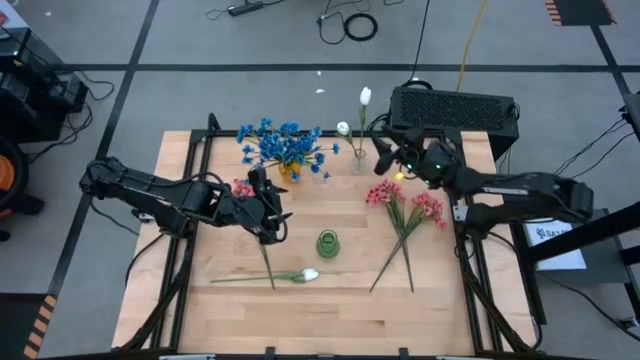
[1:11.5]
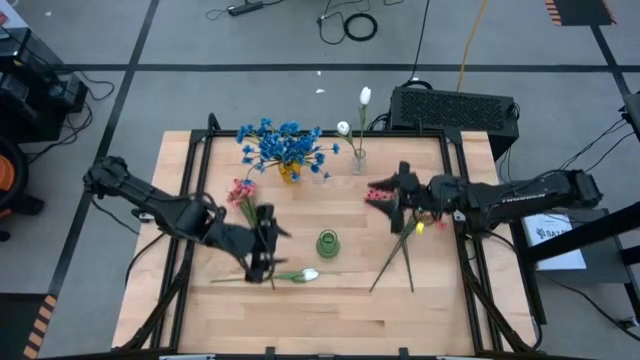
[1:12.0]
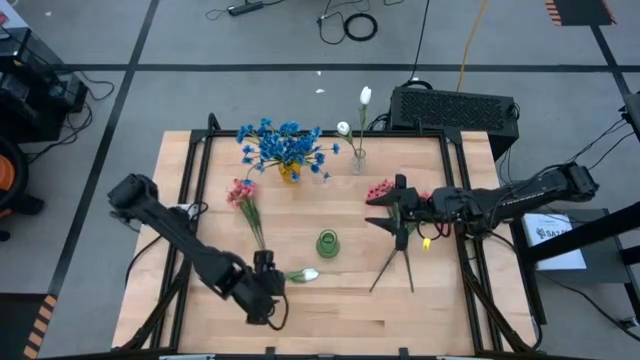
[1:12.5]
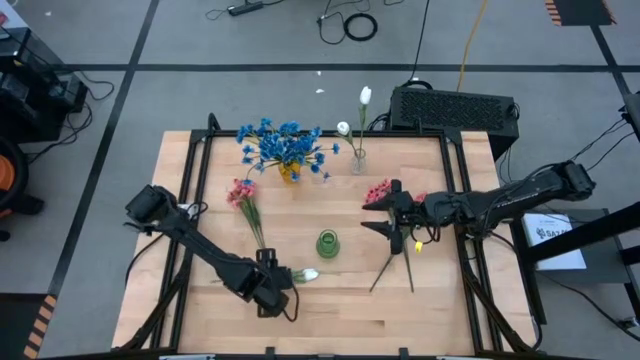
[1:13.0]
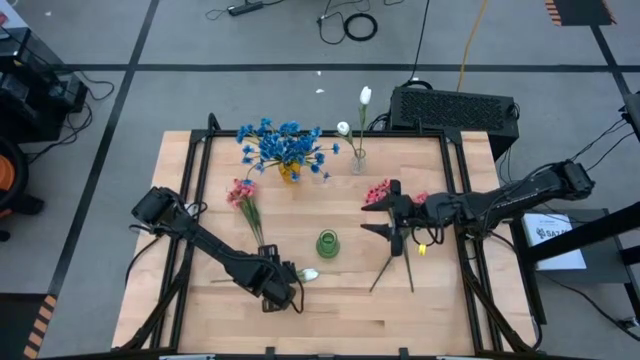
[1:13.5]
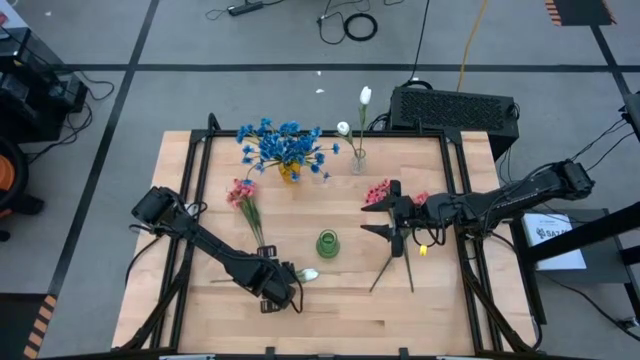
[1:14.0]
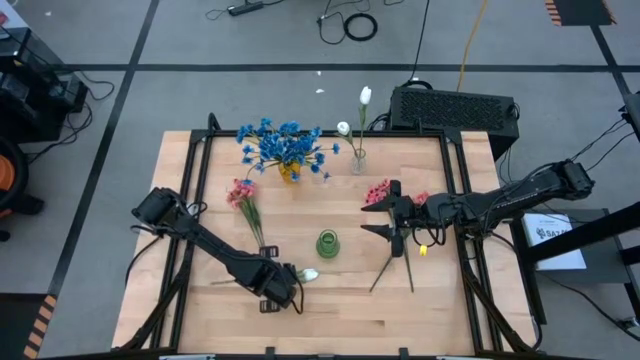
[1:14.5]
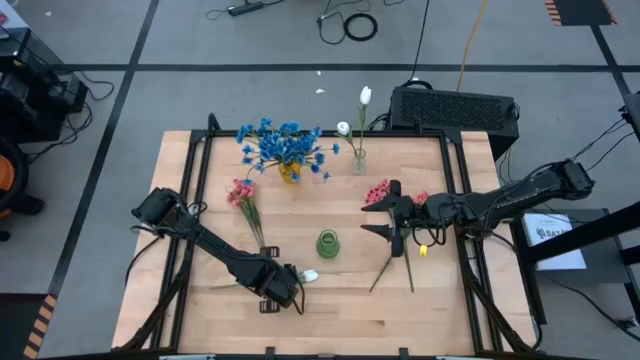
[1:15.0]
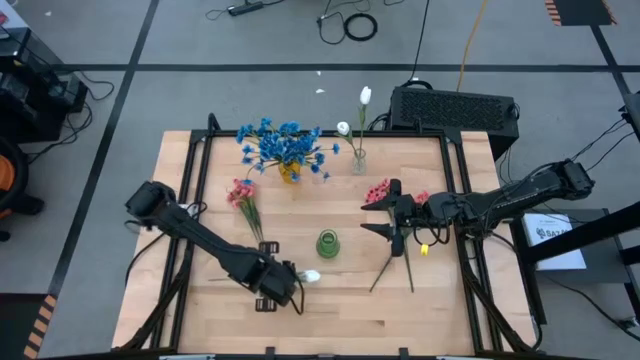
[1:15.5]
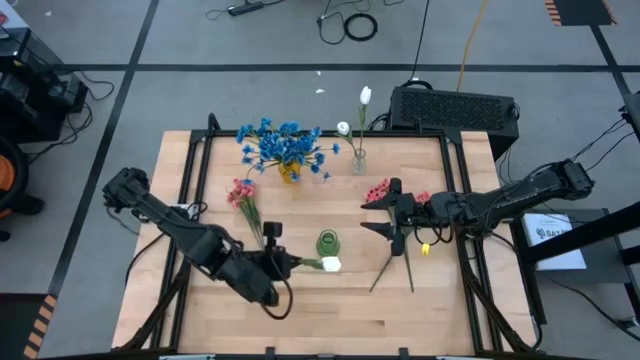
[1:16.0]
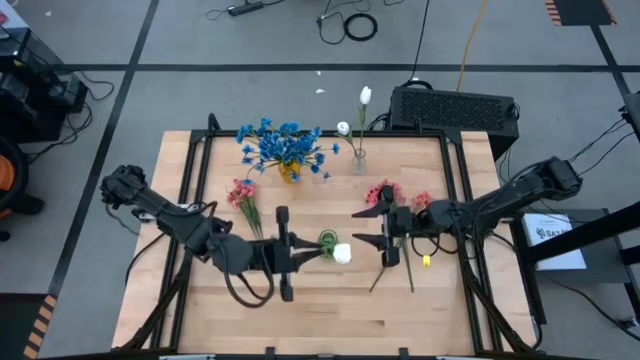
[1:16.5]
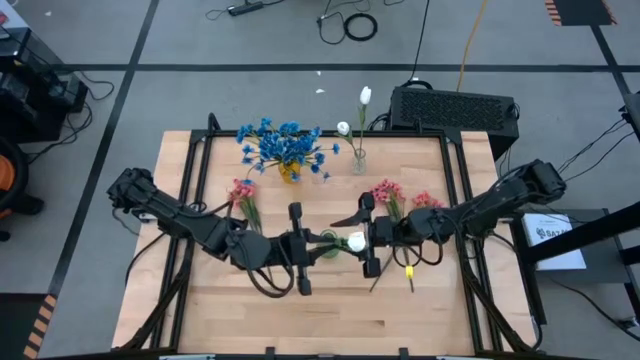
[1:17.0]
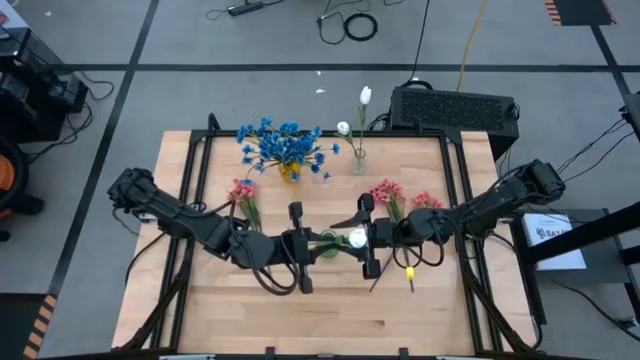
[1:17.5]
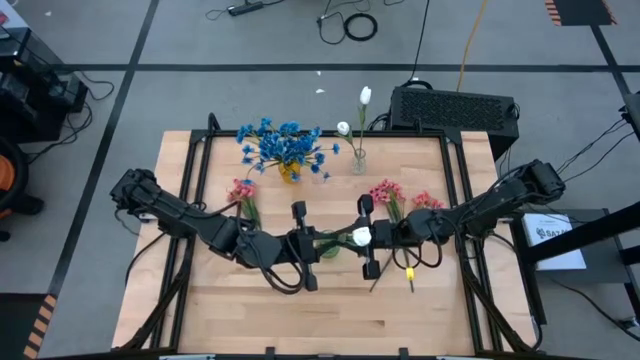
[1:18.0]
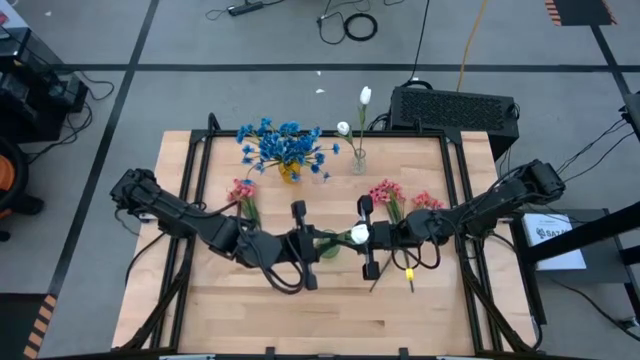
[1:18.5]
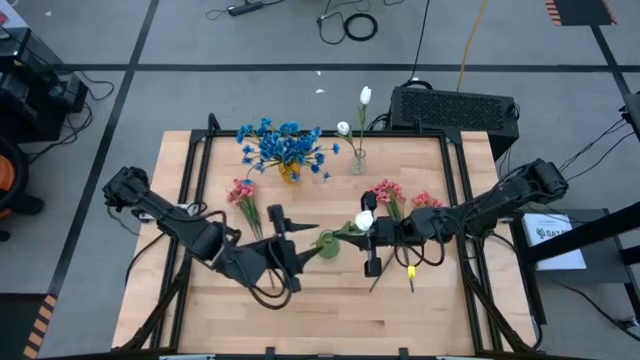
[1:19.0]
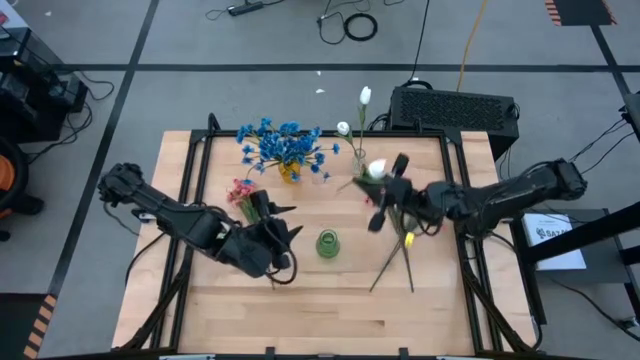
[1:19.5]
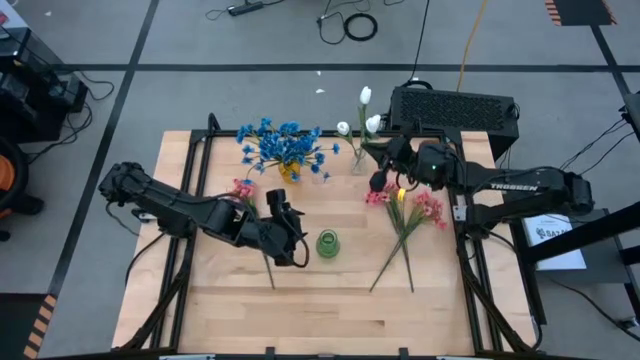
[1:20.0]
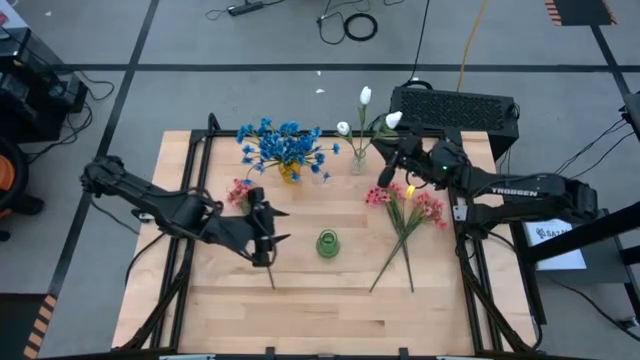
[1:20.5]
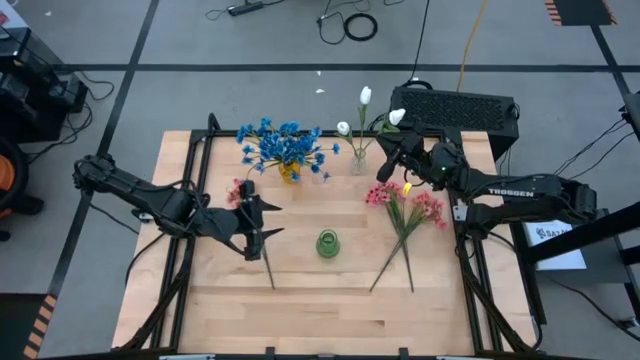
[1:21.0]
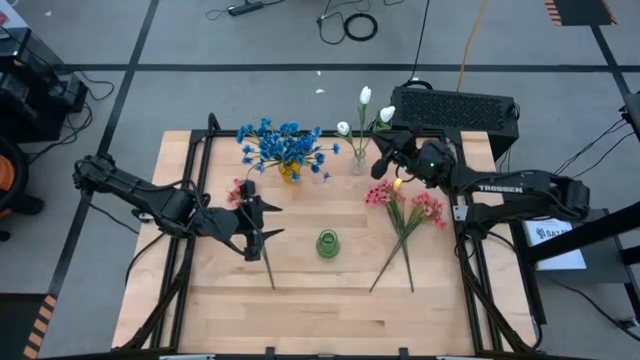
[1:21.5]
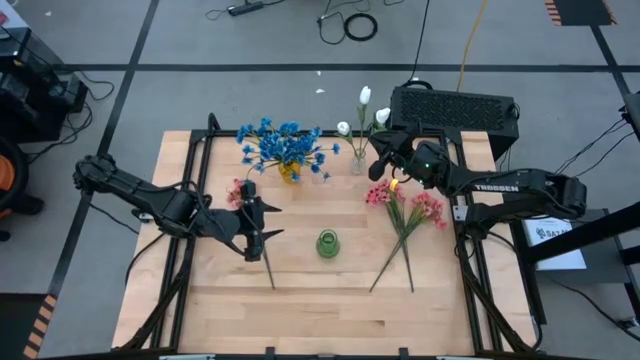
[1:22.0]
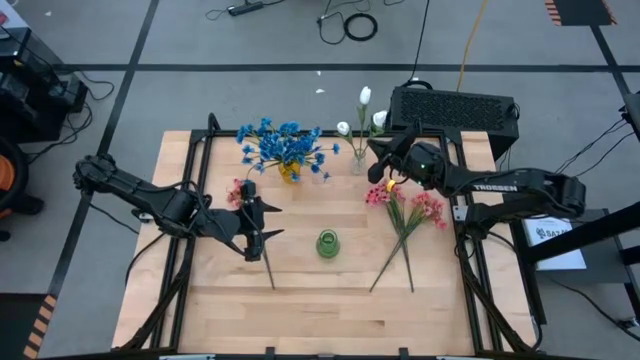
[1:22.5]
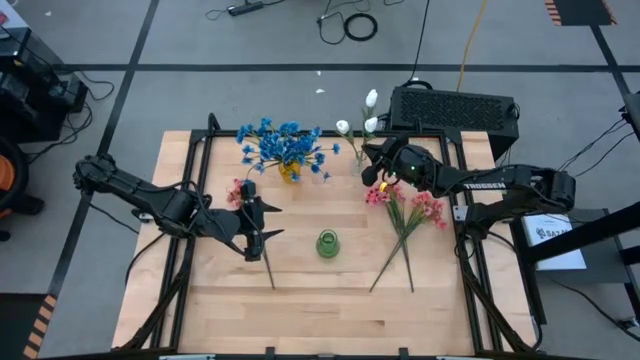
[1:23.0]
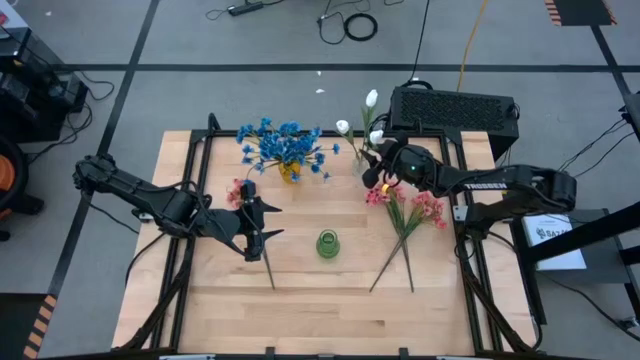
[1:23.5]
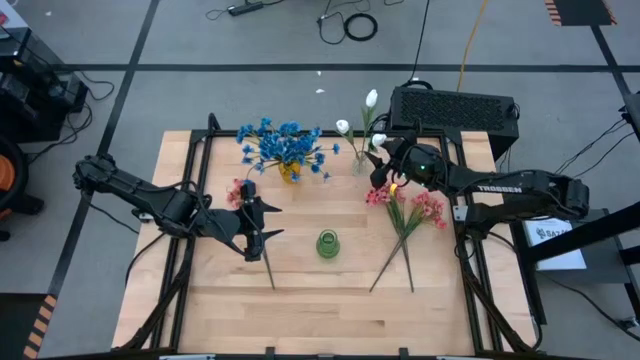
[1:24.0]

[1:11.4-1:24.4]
Task: Sort flowers into vase by color
Put the white tulip into the transparent vase

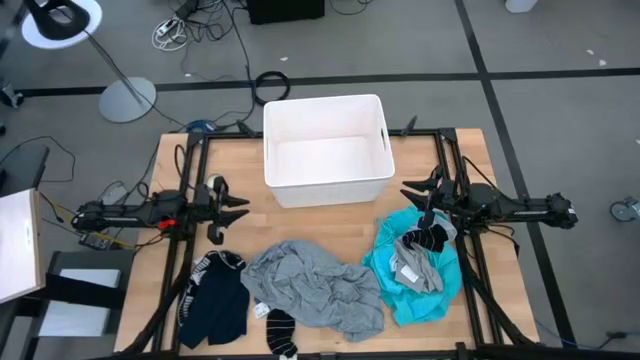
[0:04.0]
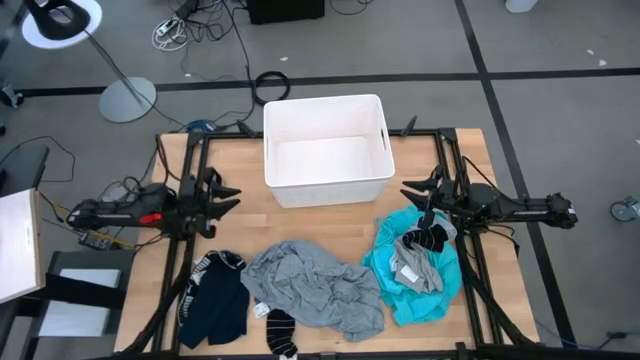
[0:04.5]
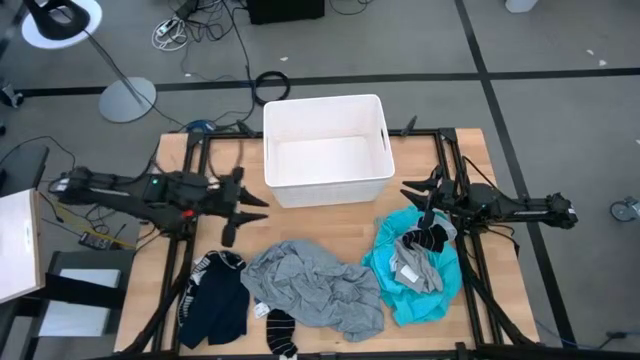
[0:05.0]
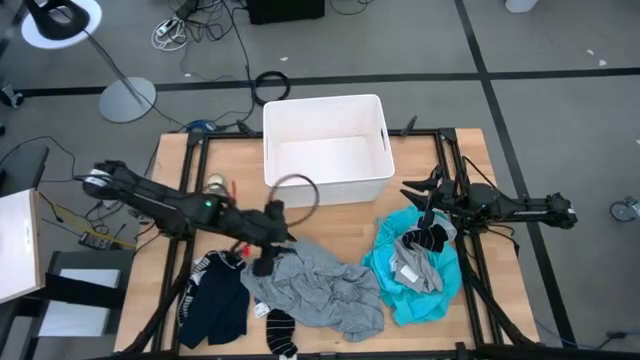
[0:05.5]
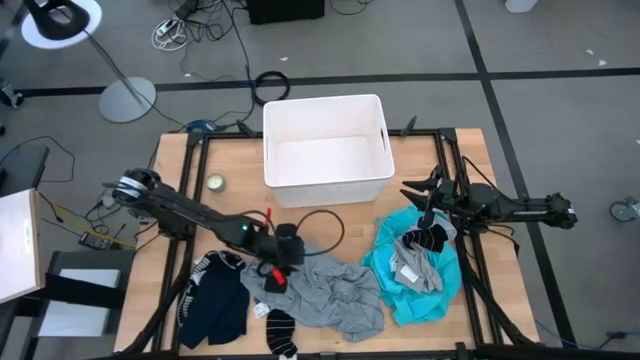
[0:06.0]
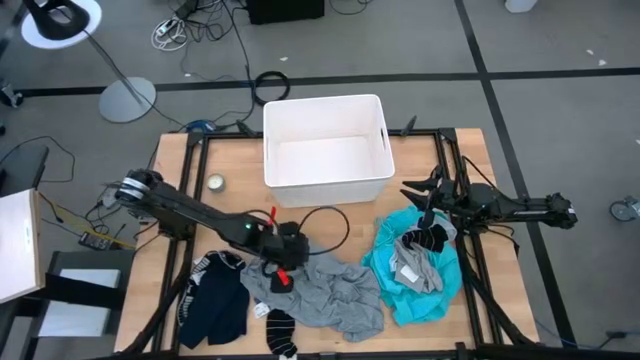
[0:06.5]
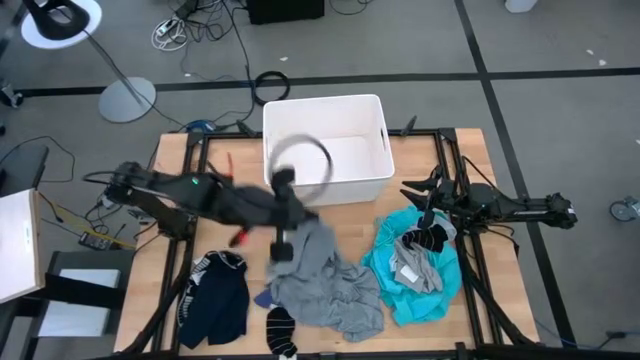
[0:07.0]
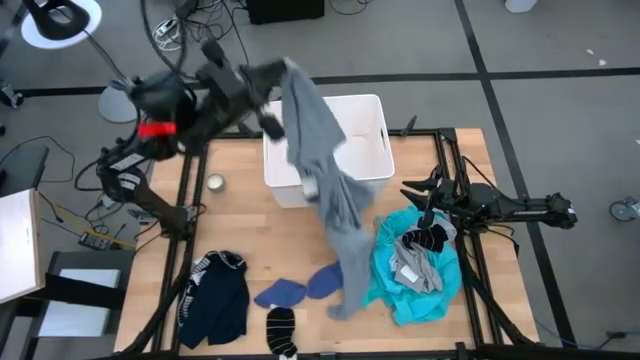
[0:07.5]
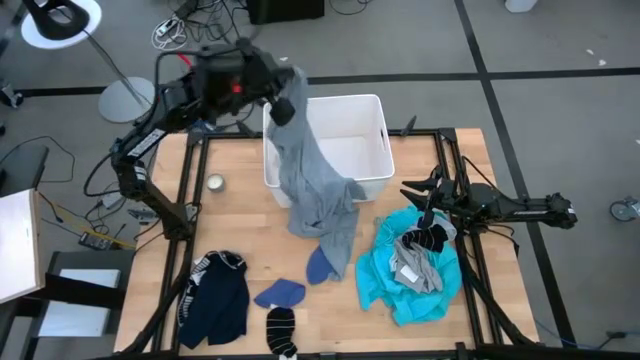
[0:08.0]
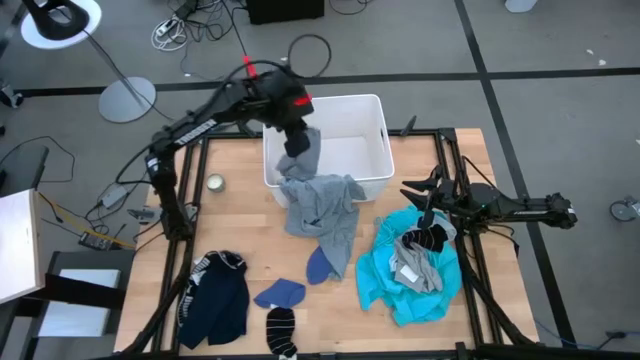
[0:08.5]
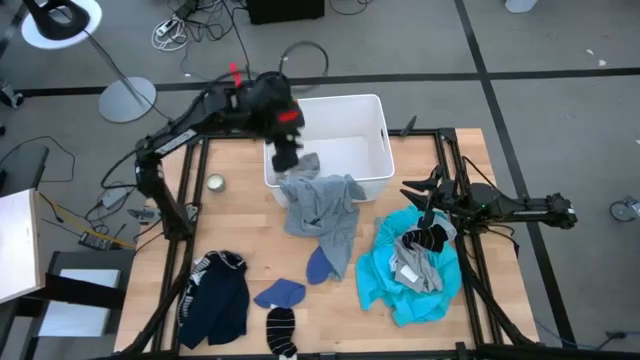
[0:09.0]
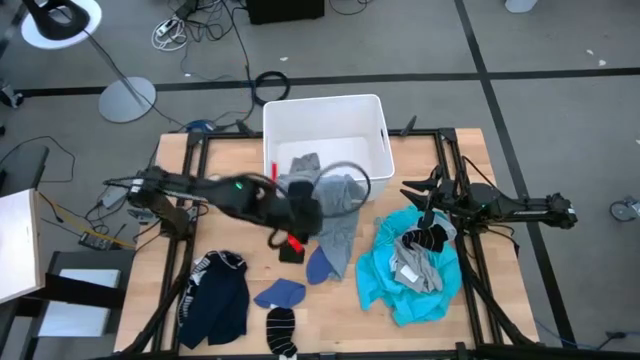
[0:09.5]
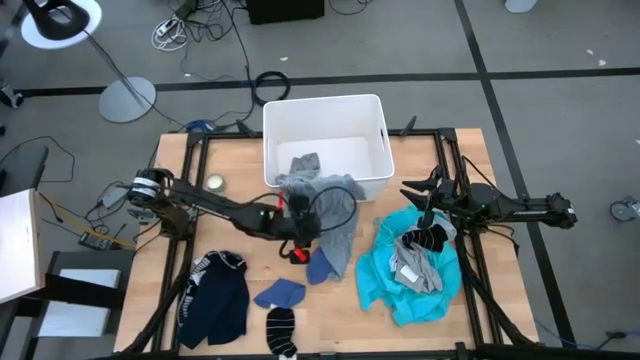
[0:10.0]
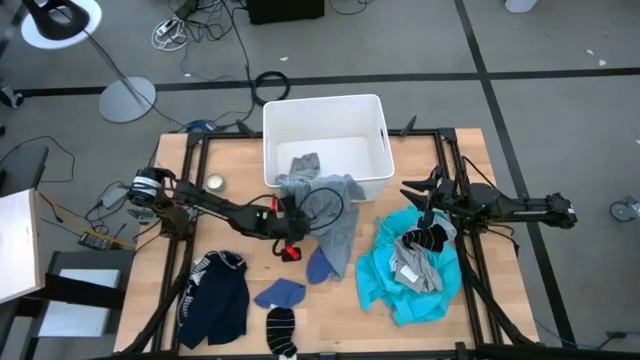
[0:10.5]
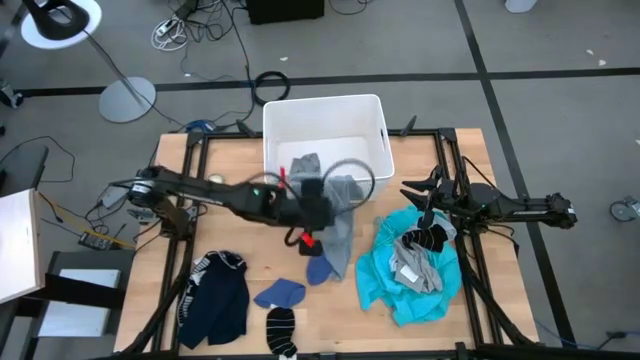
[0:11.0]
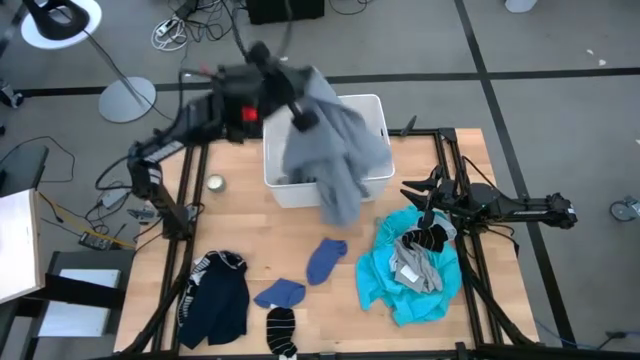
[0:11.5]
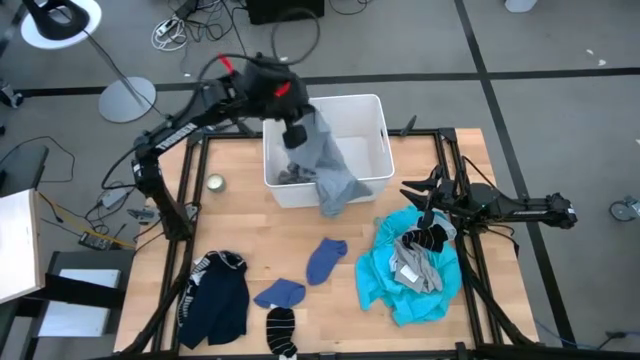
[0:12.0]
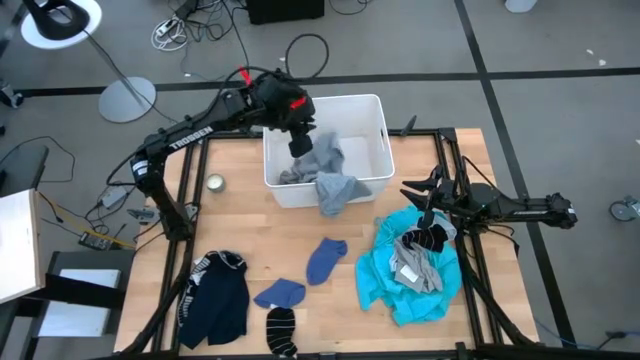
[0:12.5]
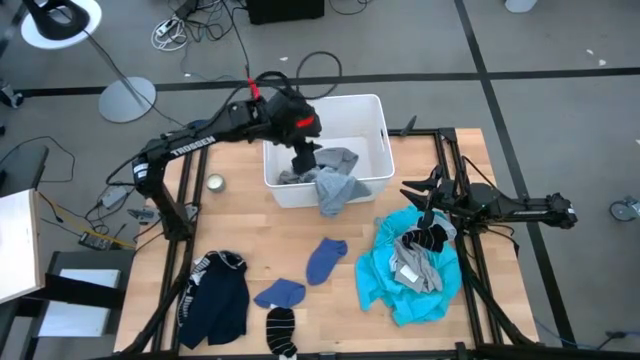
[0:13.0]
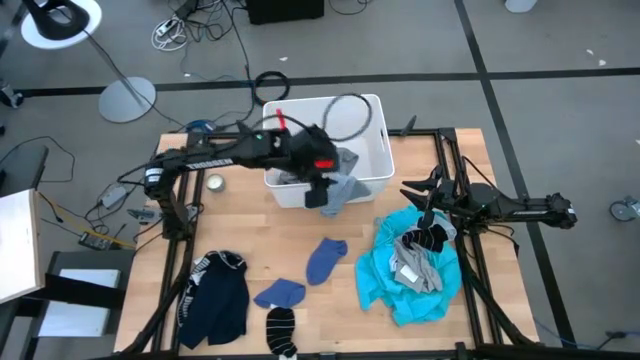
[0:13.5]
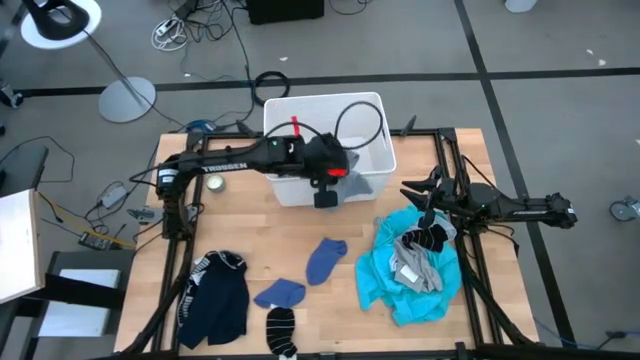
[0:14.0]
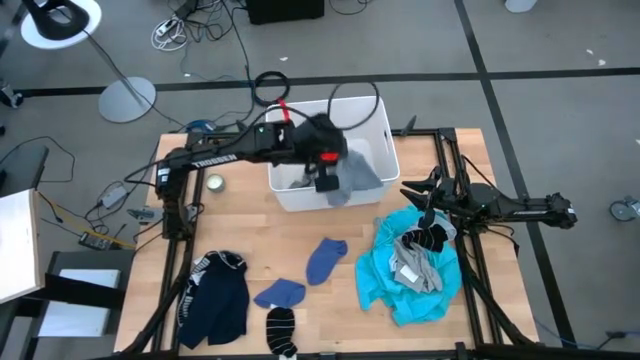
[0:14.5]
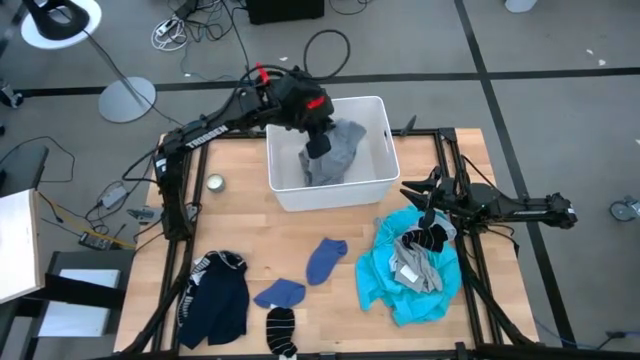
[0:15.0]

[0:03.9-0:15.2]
Task: Sort clothes
Put the gray shirt into the white laundry organizer
